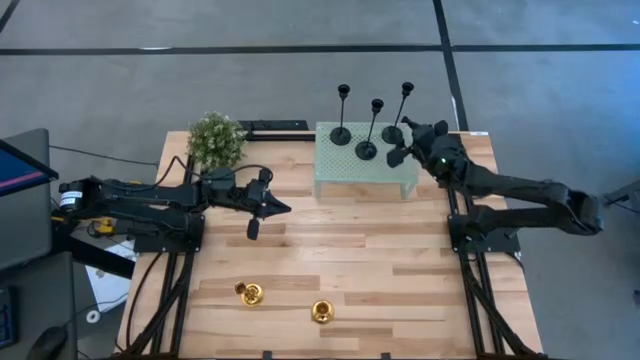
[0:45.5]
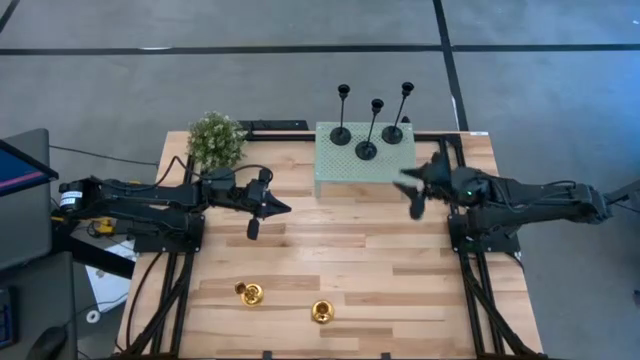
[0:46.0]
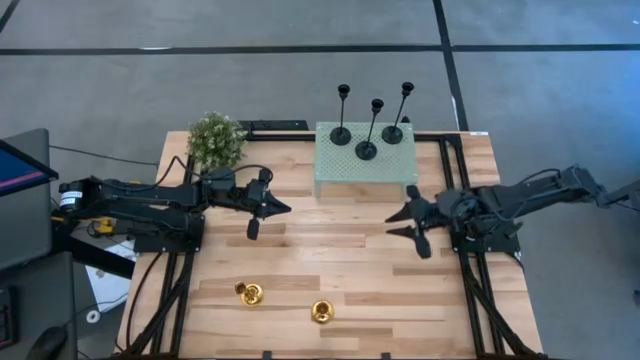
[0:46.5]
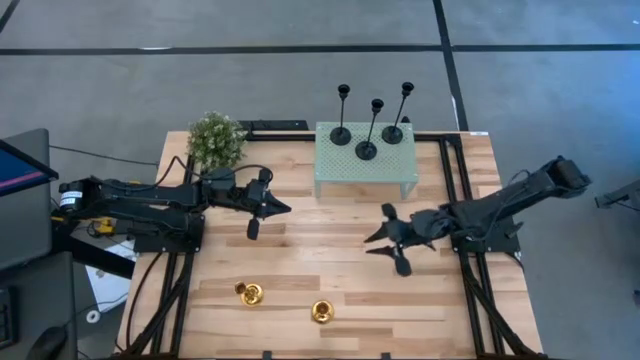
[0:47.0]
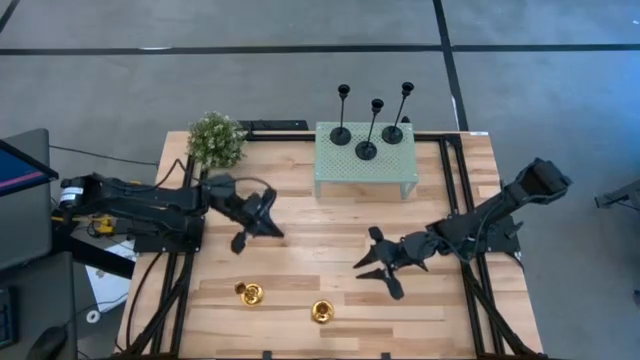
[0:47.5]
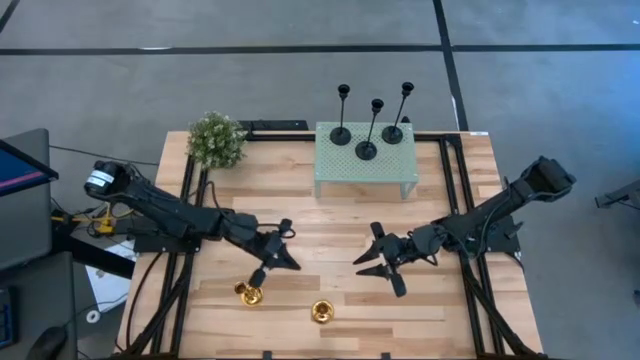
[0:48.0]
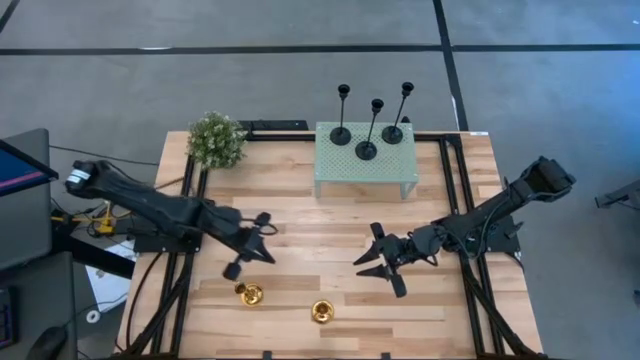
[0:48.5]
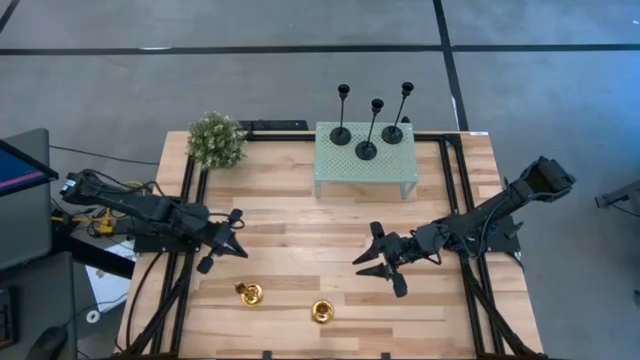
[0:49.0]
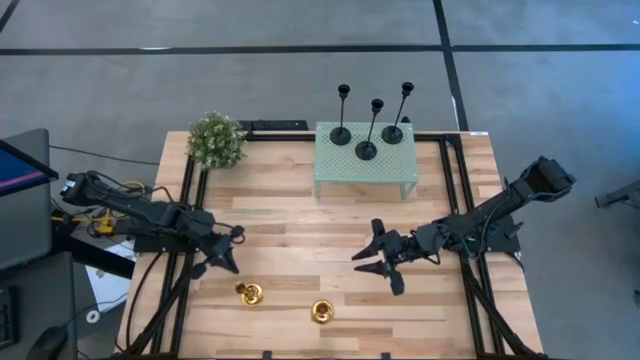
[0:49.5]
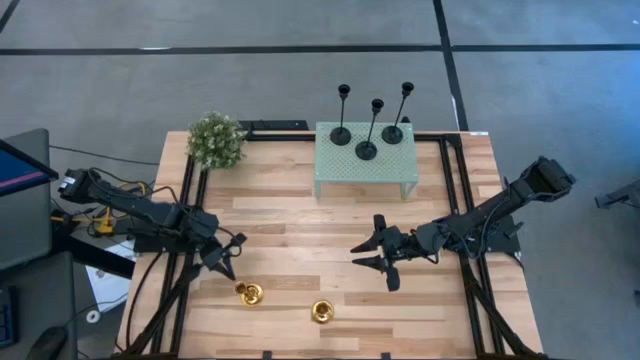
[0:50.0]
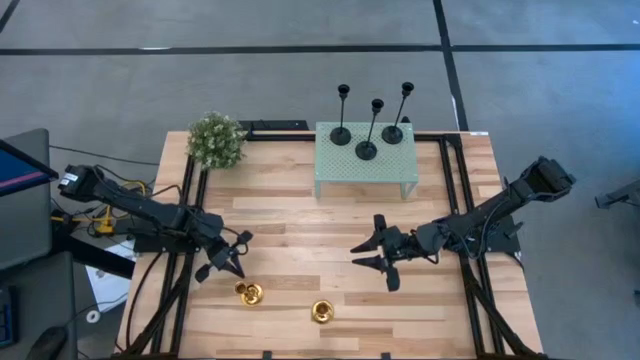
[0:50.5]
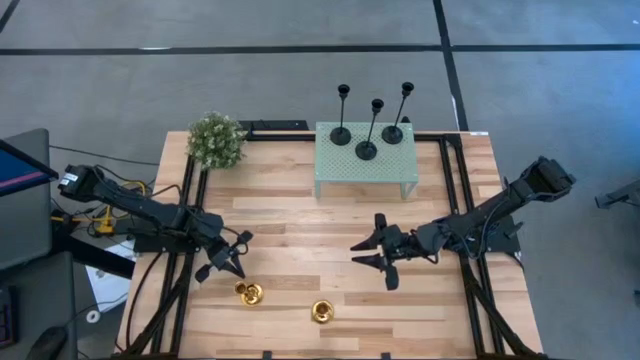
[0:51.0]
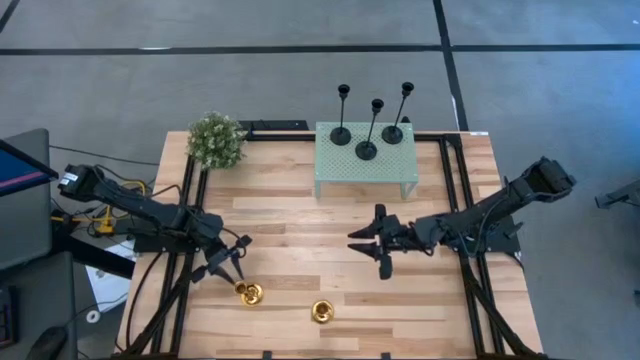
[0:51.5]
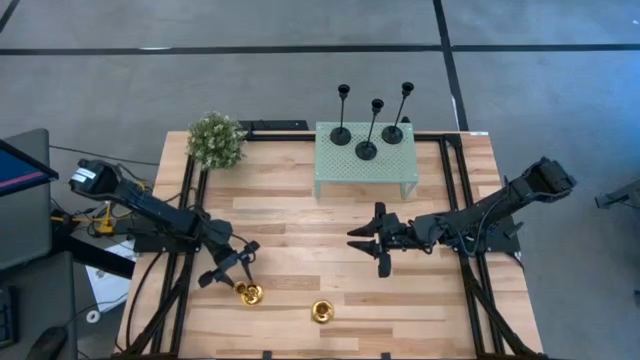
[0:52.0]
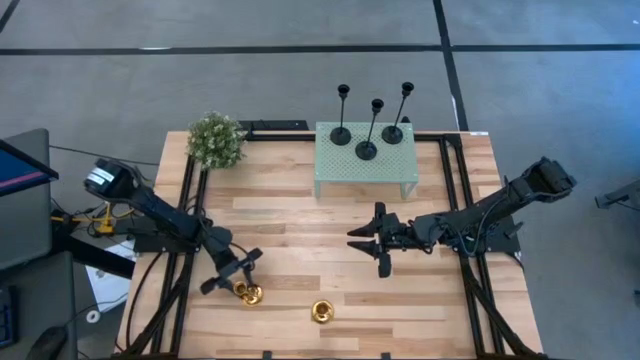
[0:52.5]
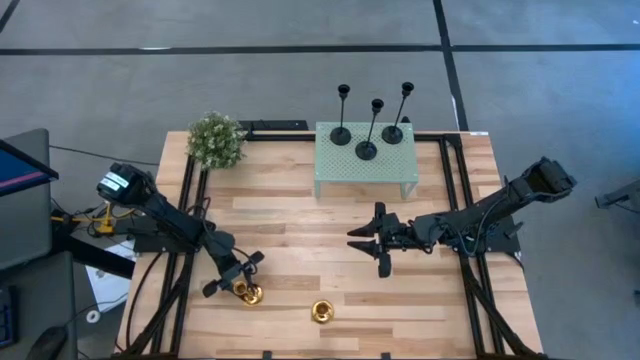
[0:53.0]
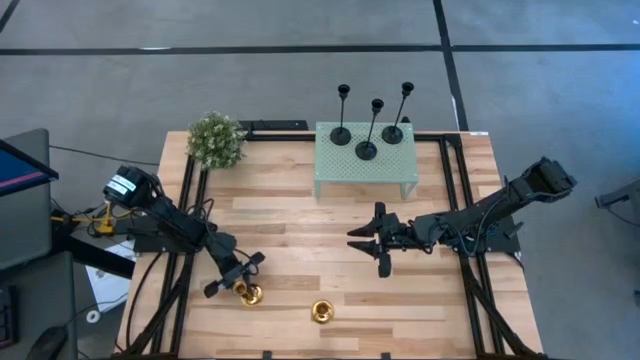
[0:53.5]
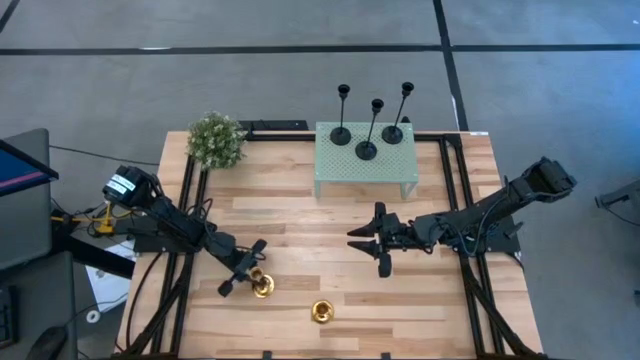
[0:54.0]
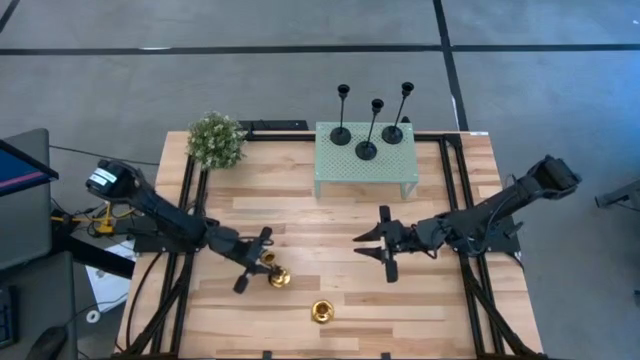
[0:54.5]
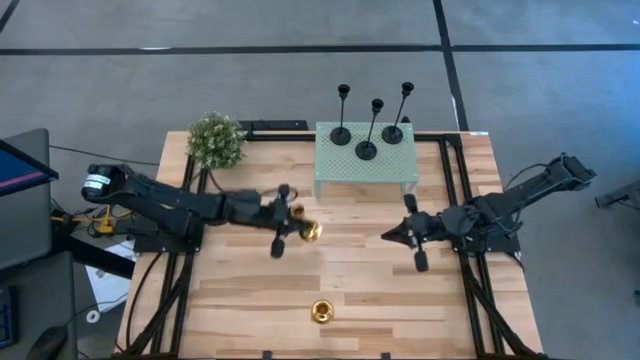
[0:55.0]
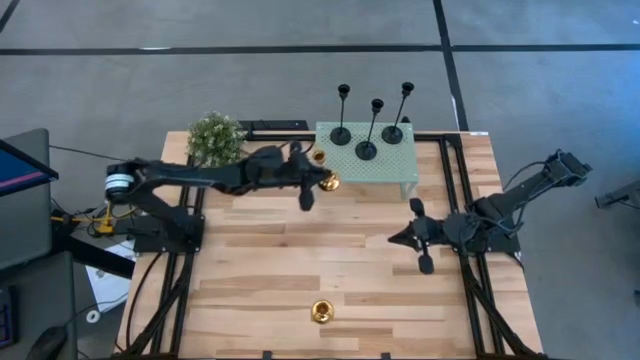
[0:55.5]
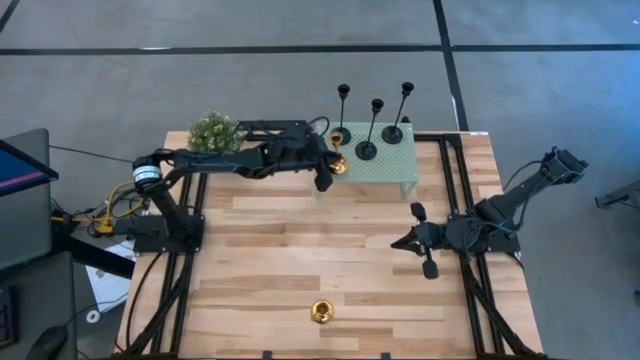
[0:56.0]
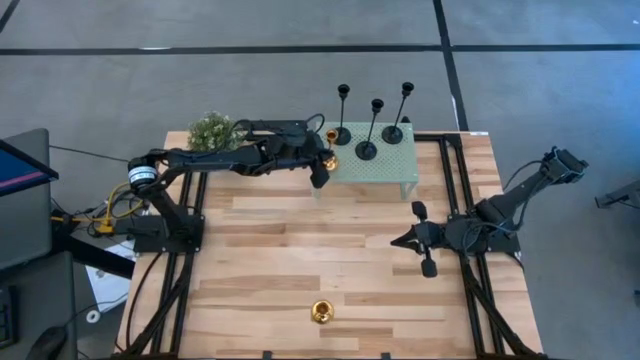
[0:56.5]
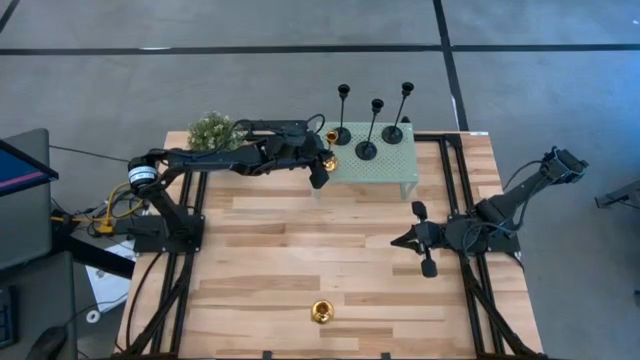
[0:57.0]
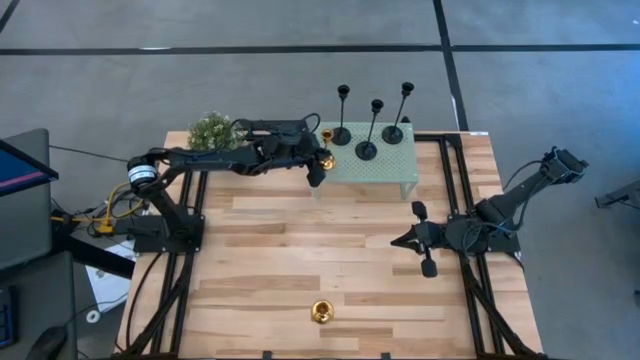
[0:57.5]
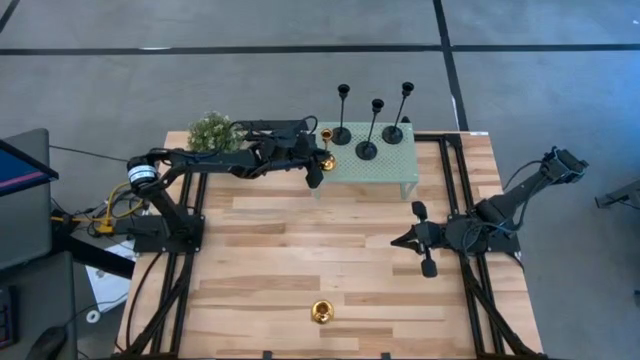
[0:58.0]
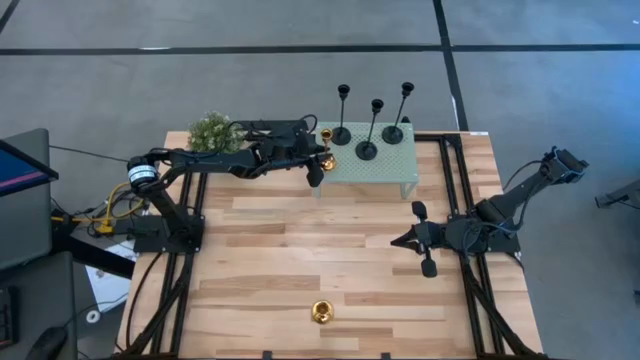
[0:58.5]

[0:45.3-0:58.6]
Task: Pick & Place candle stick holders
Put the left gold candle holder on the shelf

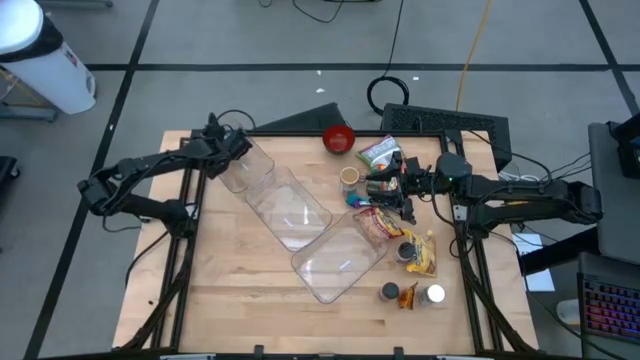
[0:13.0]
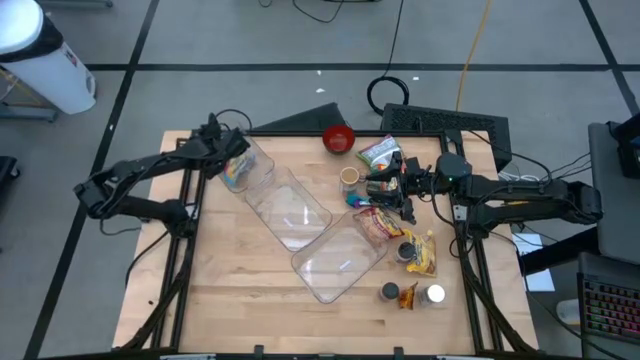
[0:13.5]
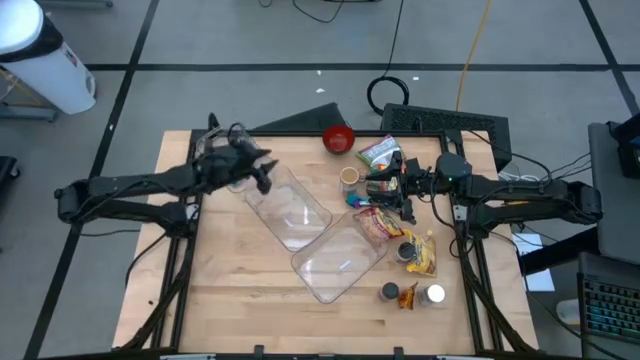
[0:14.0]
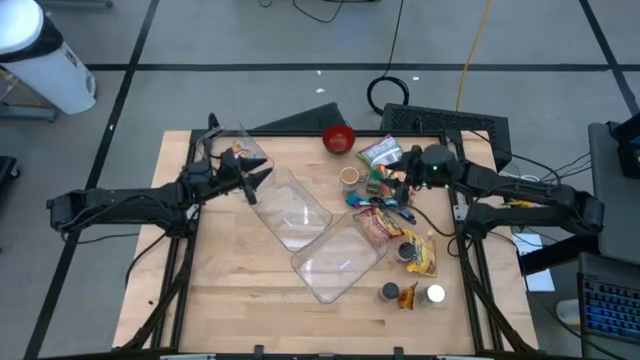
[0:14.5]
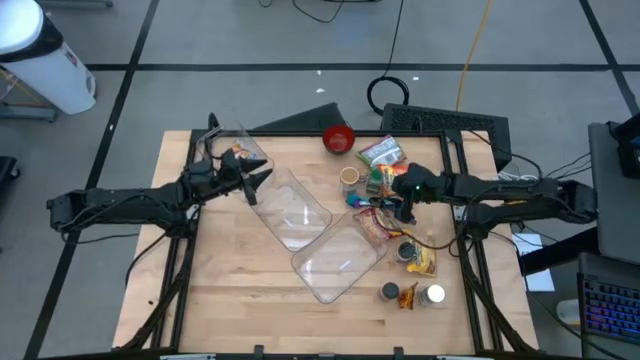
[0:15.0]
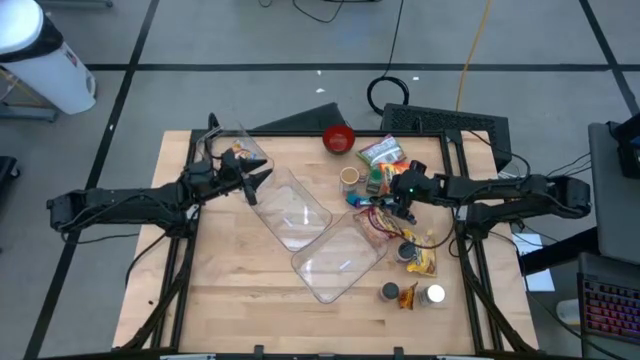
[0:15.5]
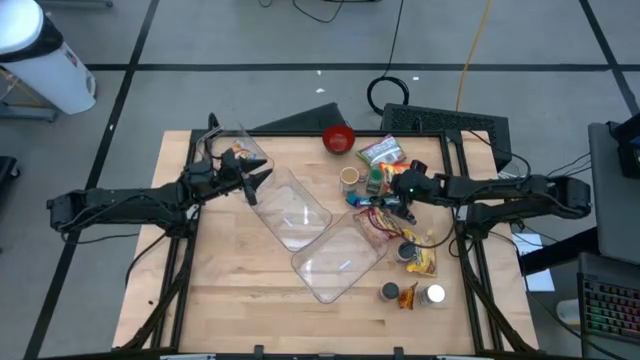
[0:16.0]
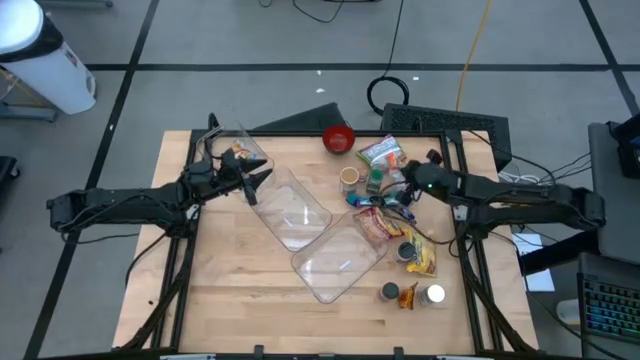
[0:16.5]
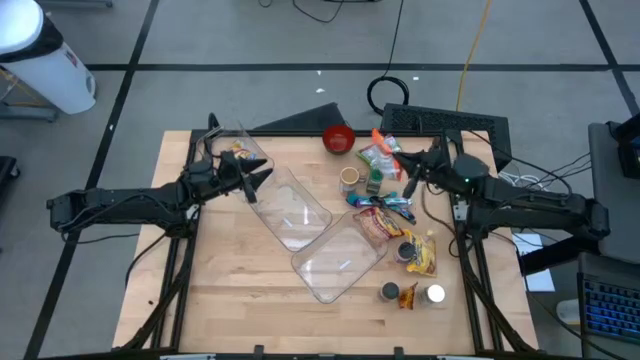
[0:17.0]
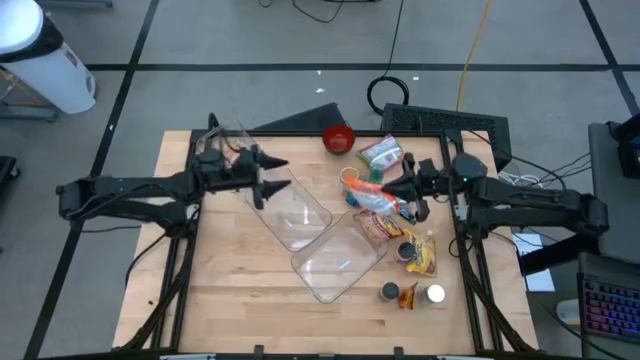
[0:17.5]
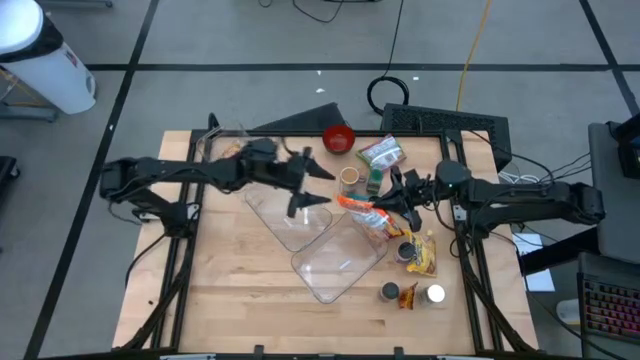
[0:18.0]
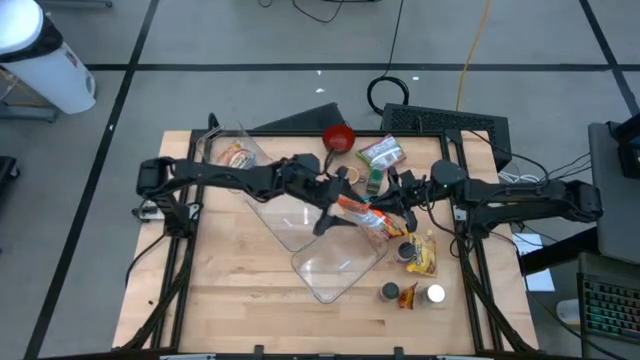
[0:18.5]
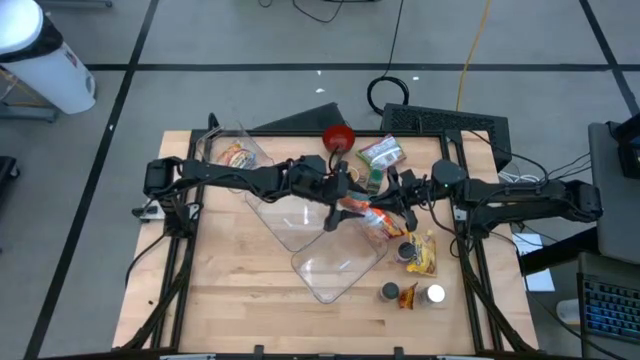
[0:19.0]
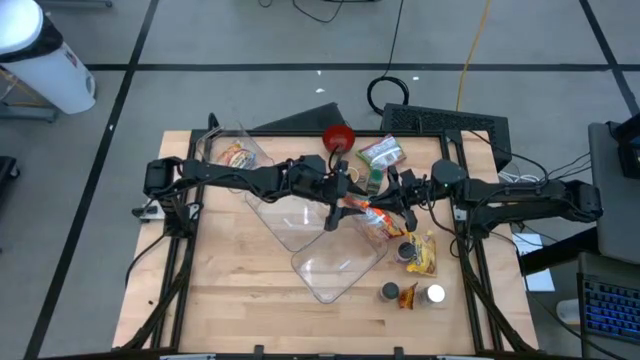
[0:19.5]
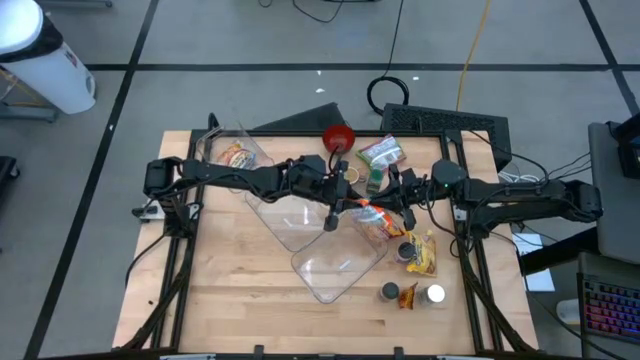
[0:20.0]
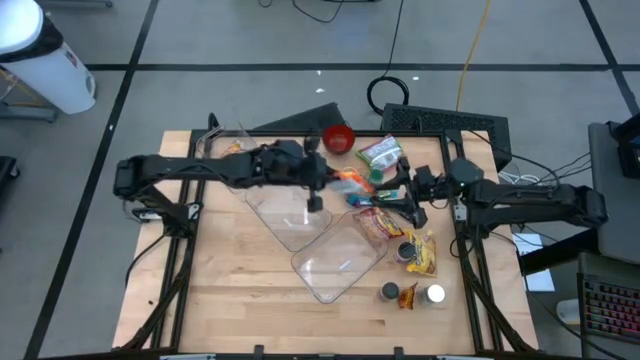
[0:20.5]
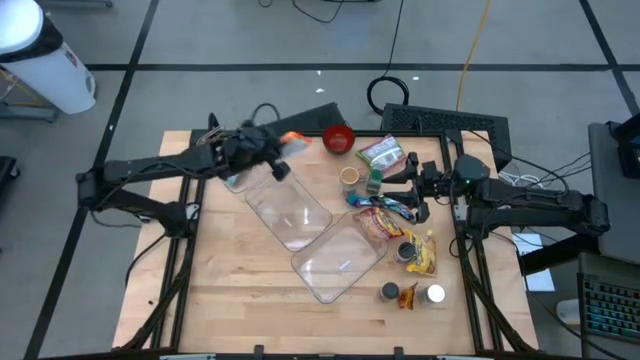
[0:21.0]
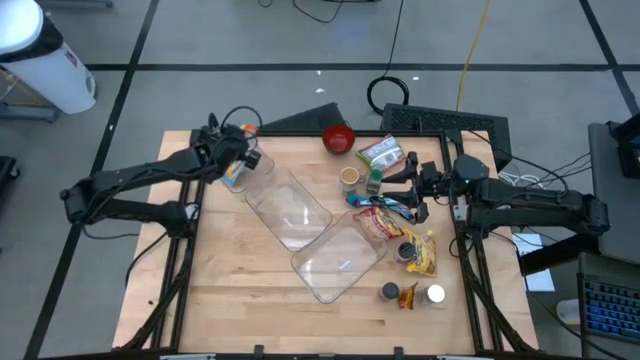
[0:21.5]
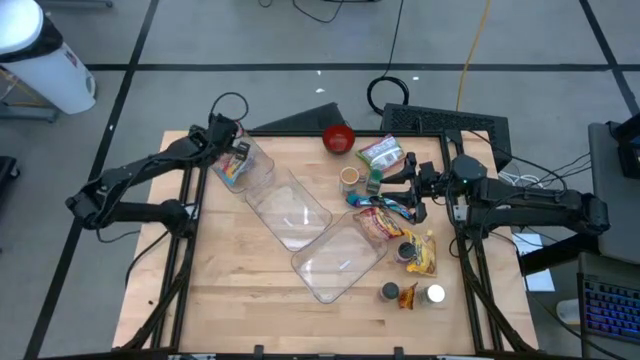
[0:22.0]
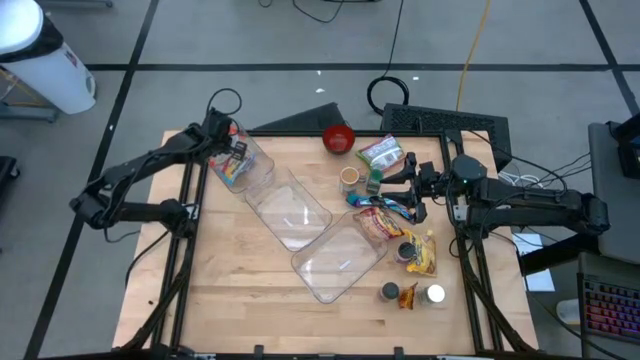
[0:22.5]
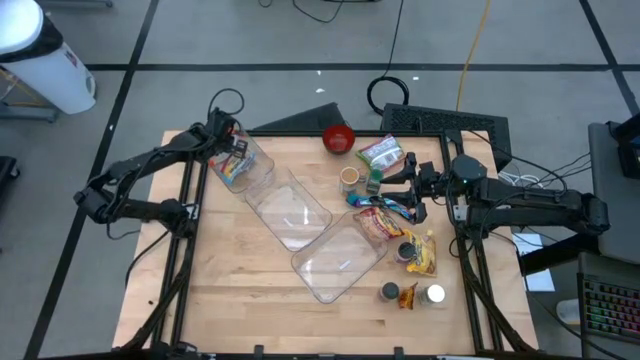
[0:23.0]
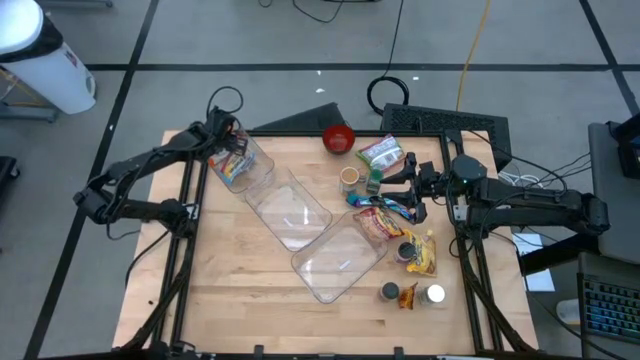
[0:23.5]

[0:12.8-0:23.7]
Task: Pick & Place Food Item
Put the orange noodle pack into the top transparent bin
